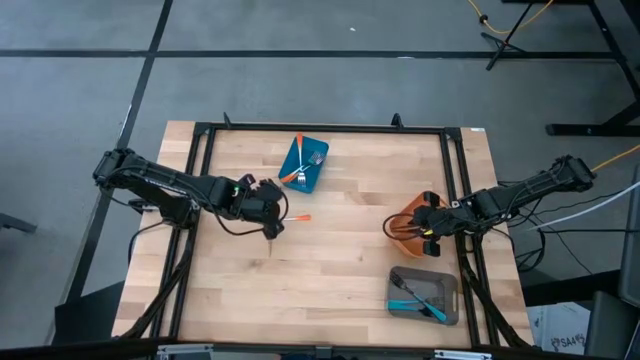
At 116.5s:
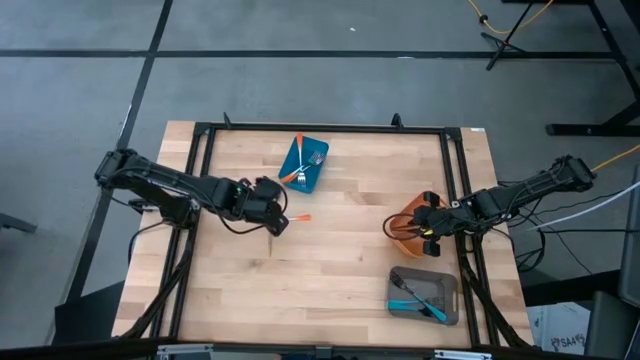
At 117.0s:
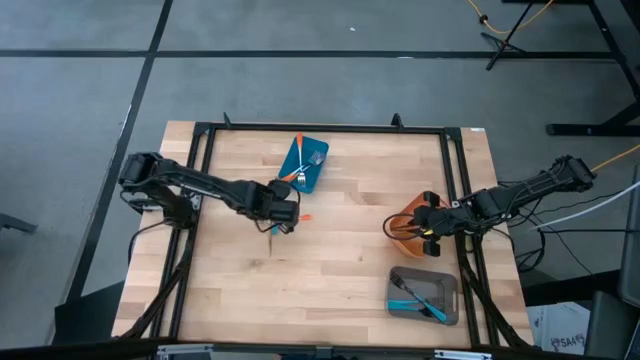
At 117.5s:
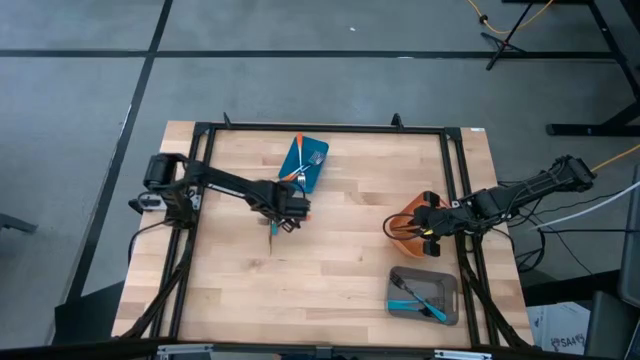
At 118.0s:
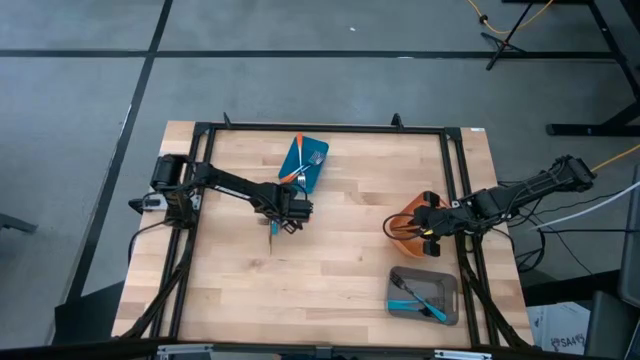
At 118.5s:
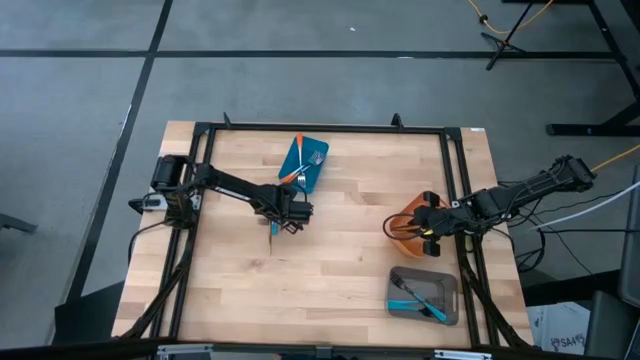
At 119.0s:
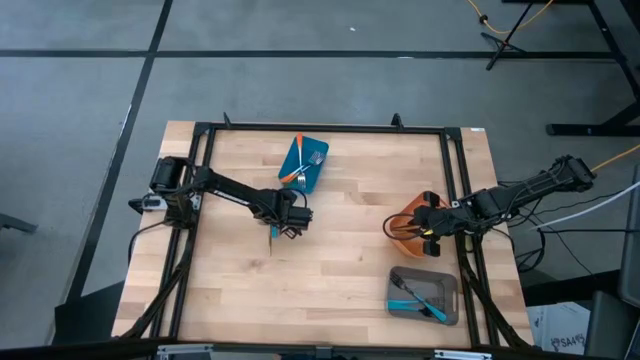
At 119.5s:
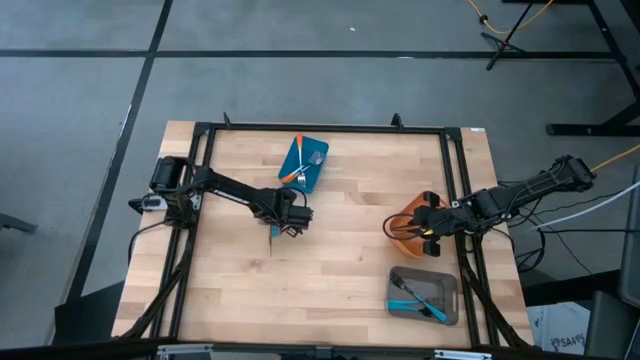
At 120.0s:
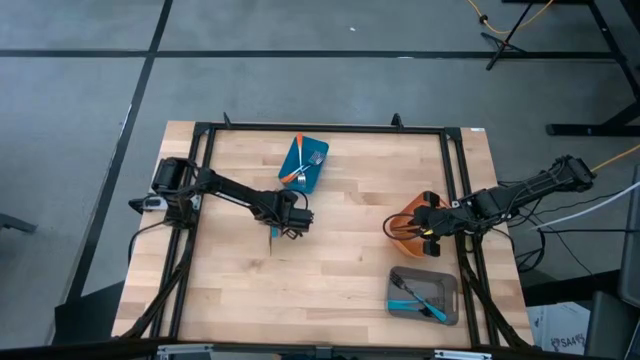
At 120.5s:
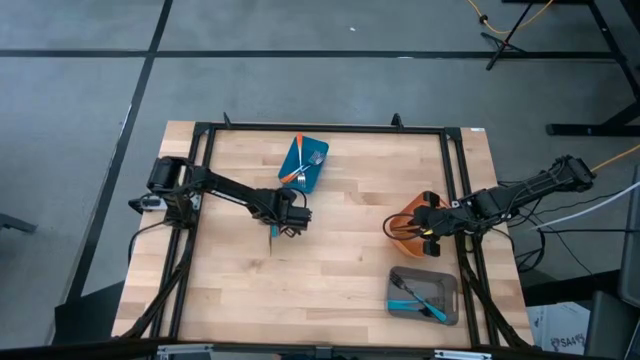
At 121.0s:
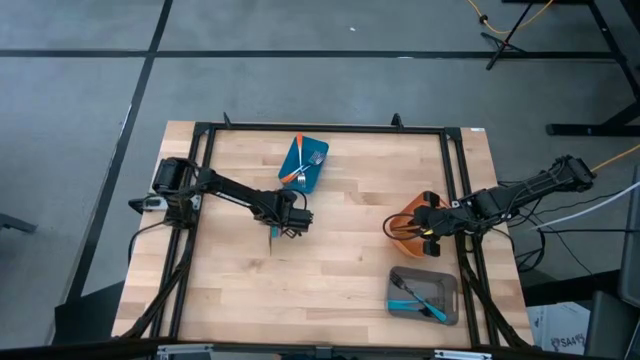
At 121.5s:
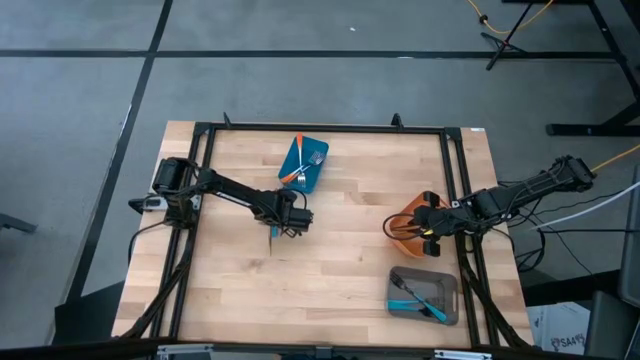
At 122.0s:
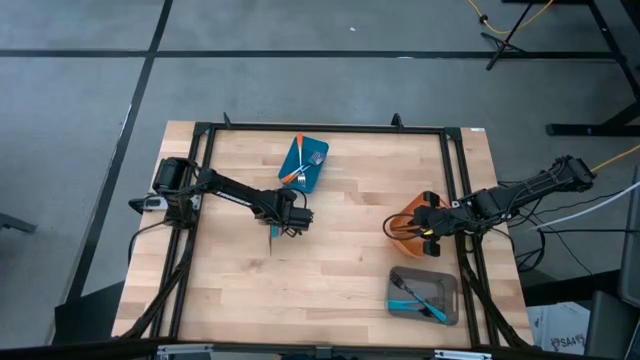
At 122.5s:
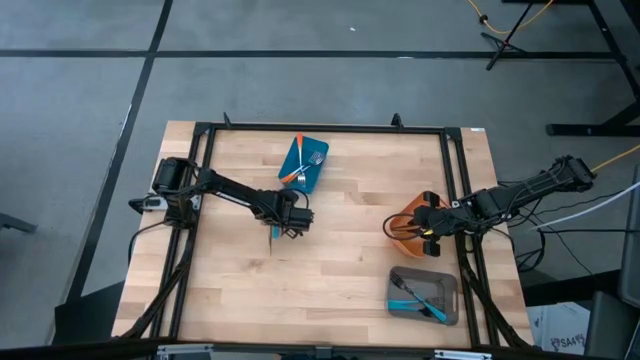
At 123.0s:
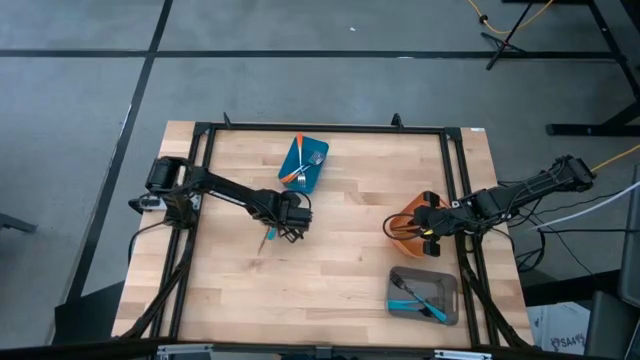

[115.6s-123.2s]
Task: Sort silverware by color (type)
Put the blue fork into the black bin

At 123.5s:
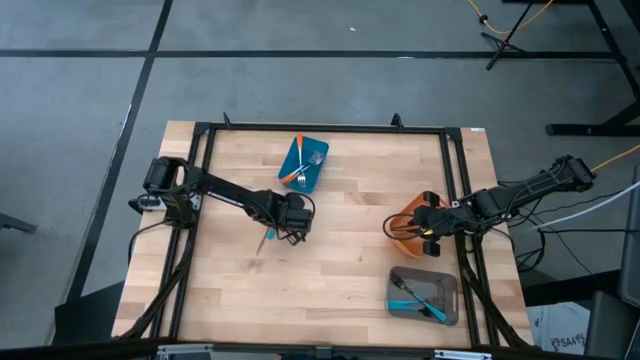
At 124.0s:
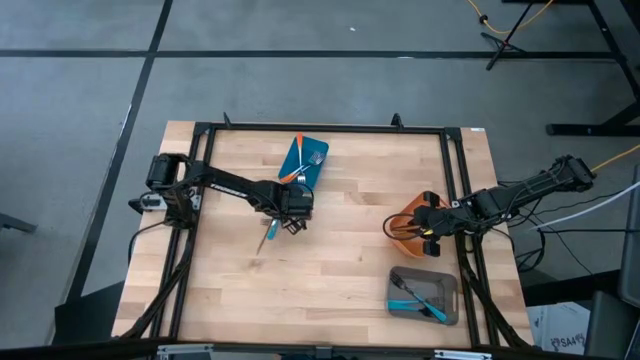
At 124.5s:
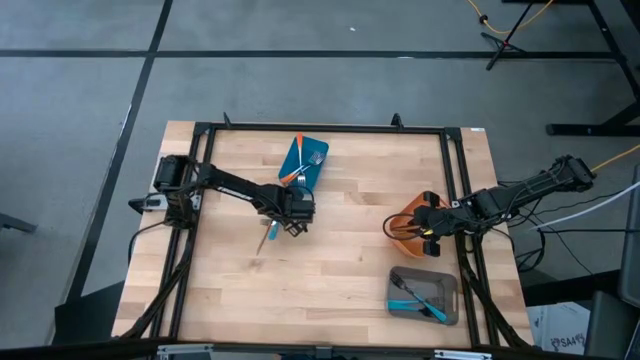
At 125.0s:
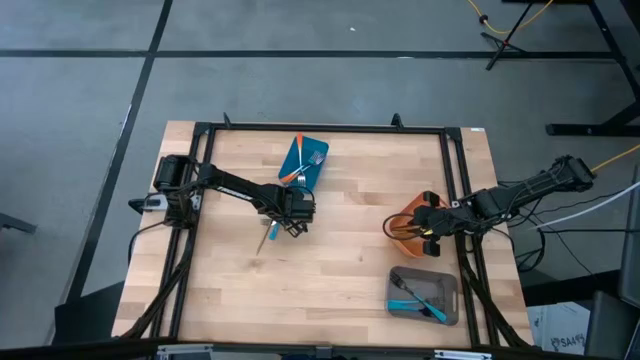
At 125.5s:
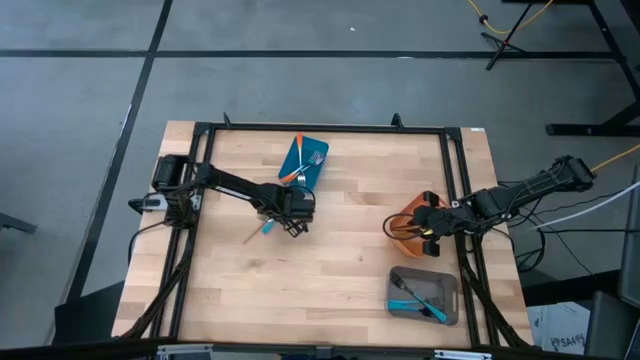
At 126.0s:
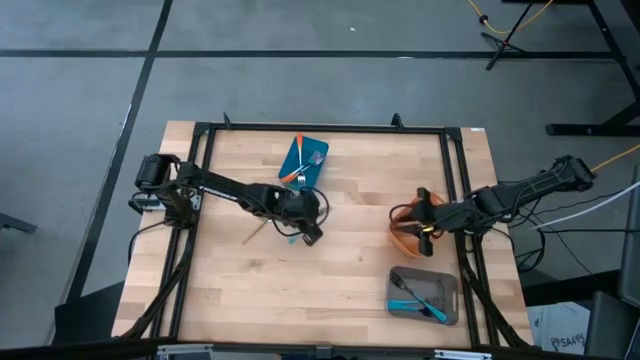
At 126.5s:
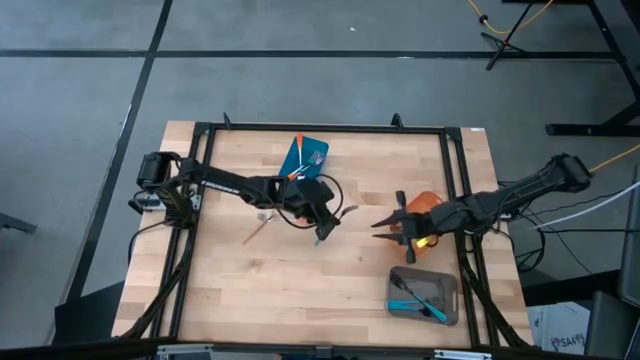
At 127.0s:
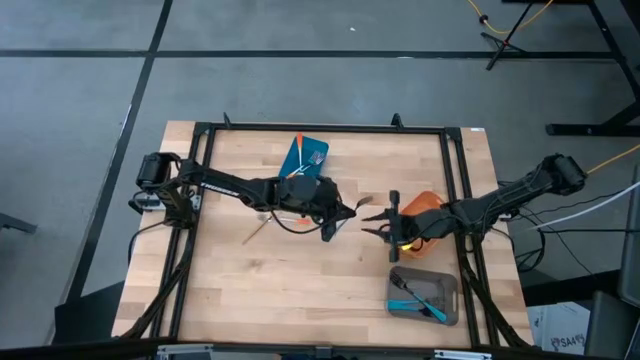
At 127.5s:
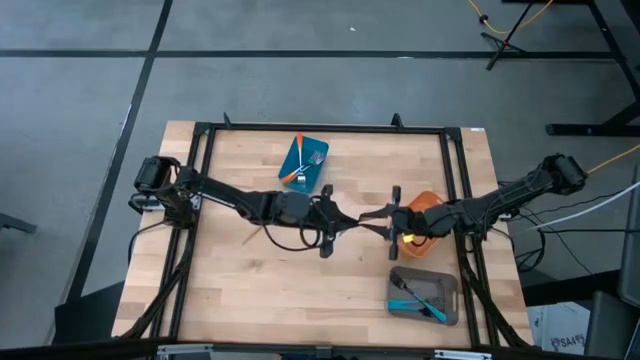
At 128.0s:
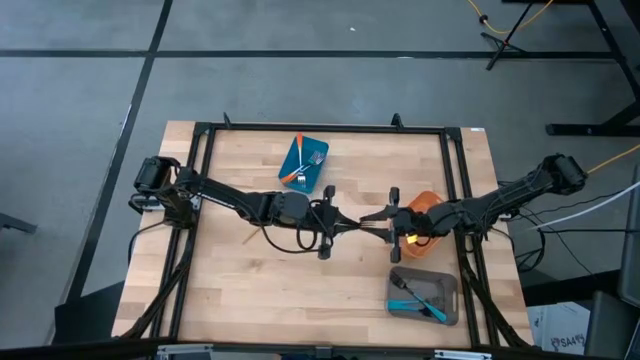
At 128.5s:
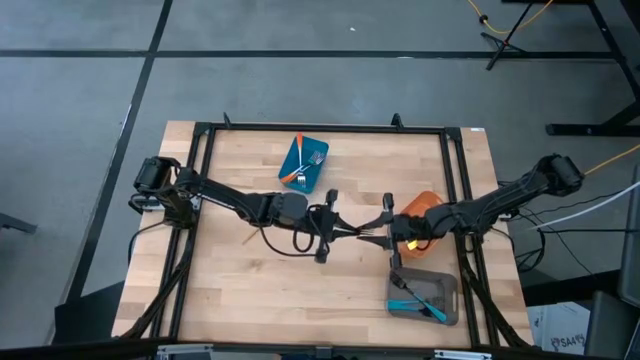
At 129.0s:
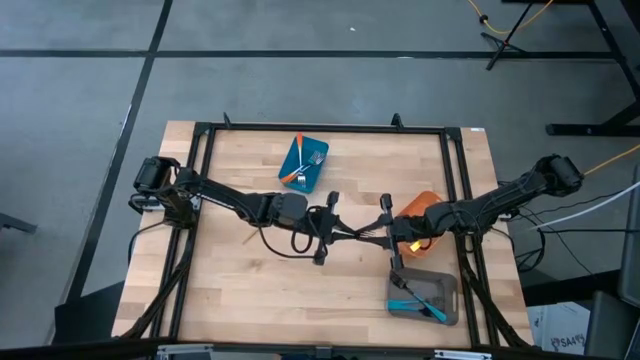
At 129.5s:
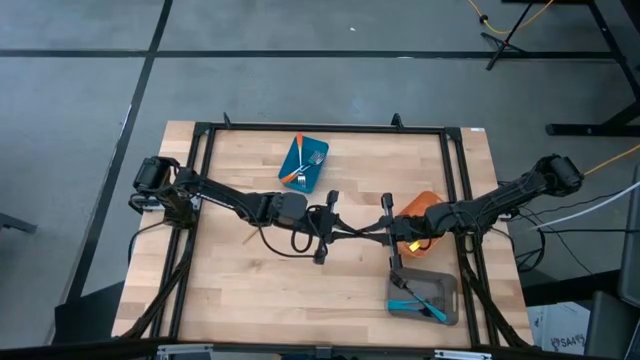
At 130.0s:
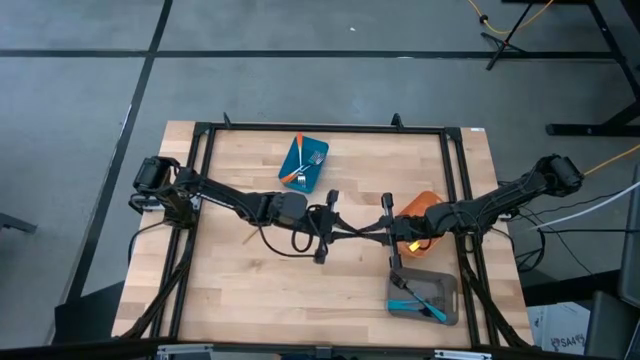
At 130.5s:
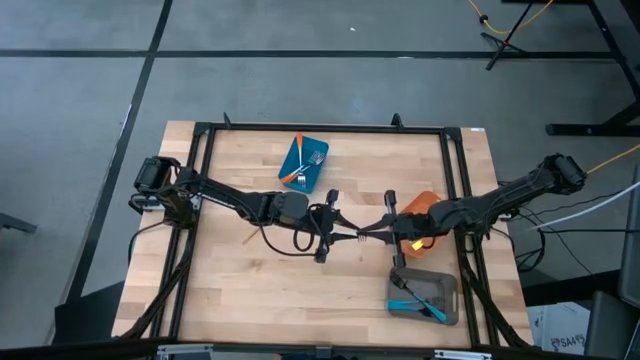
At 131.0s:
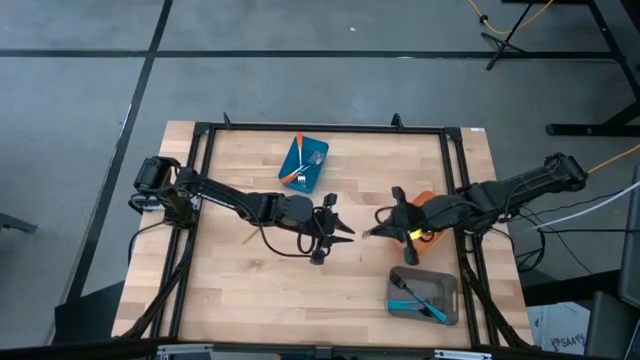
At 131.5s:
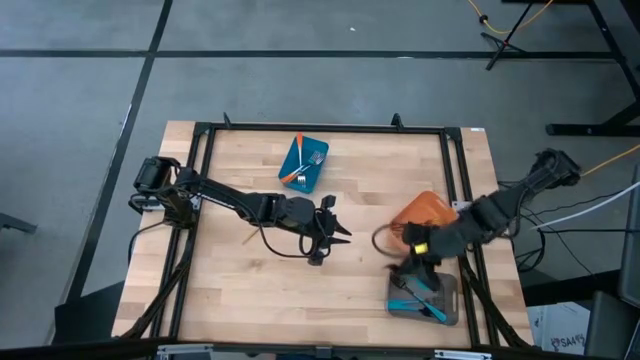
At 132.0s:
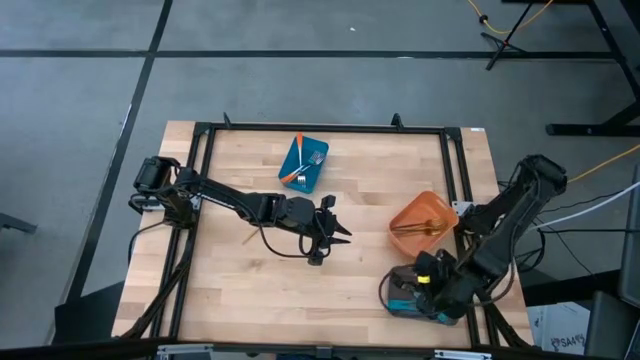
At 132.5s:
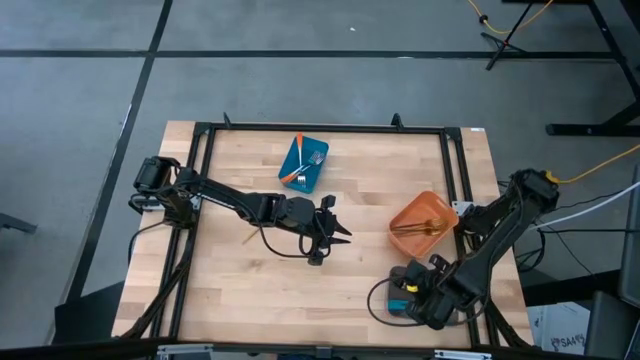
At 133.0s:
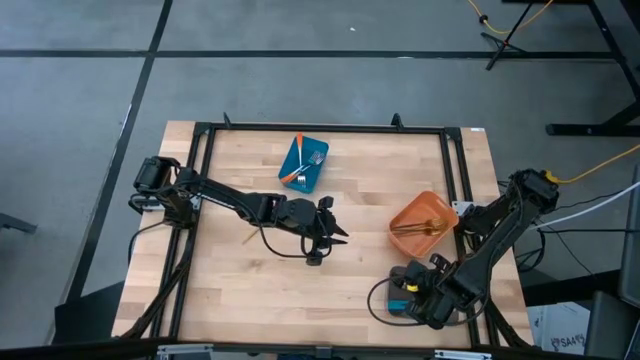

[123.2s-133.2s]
Put the blue fork into the black bin

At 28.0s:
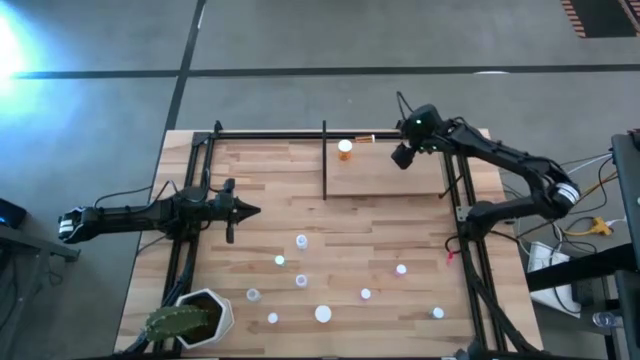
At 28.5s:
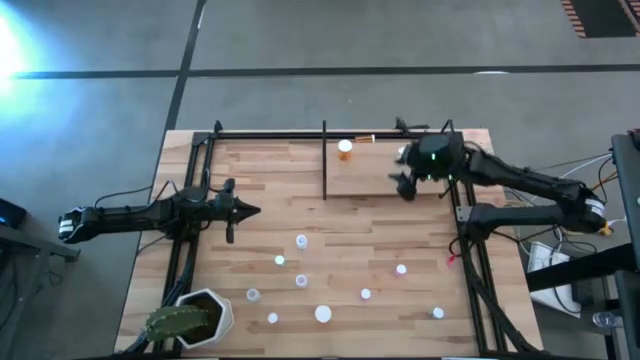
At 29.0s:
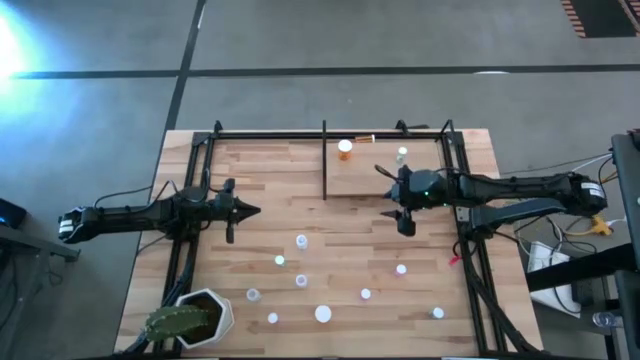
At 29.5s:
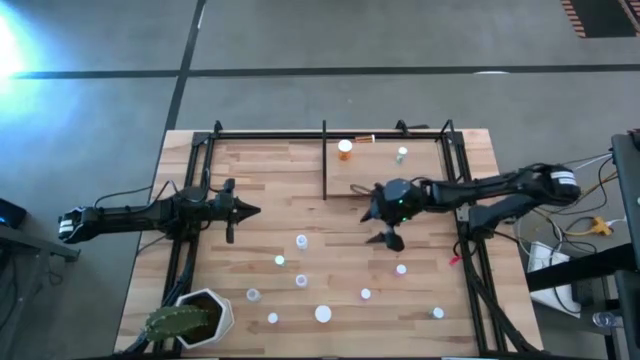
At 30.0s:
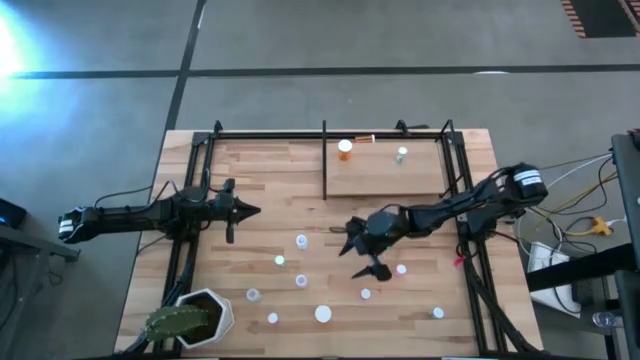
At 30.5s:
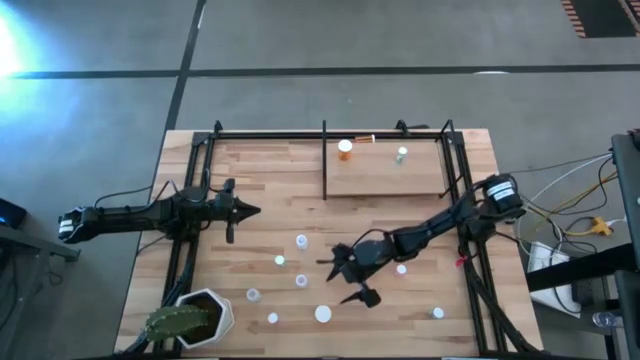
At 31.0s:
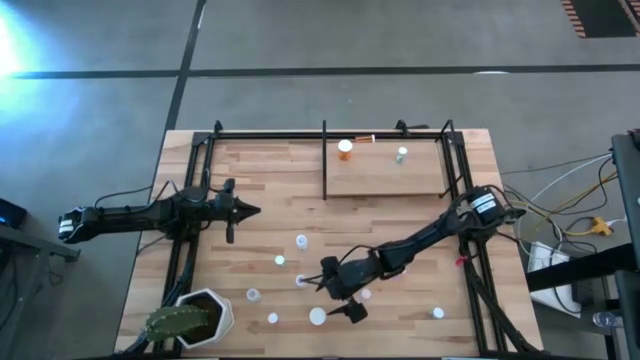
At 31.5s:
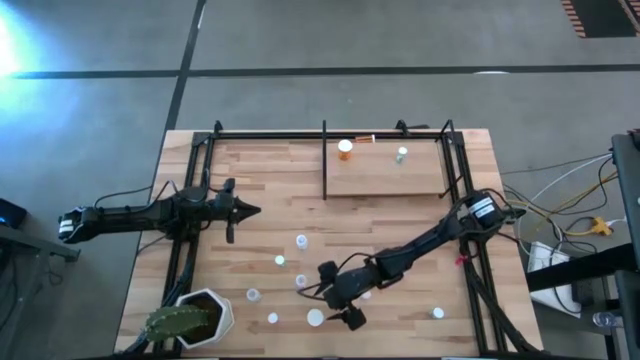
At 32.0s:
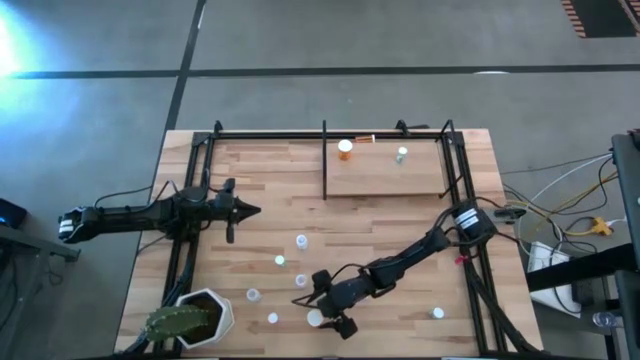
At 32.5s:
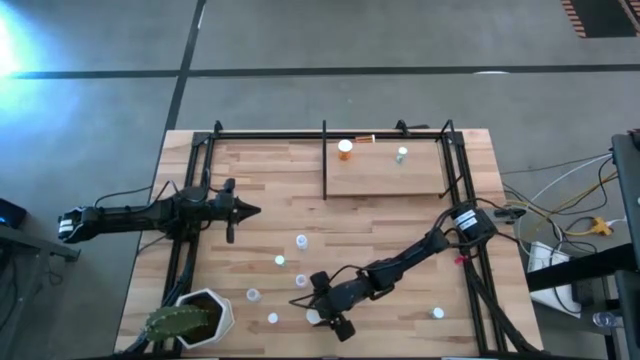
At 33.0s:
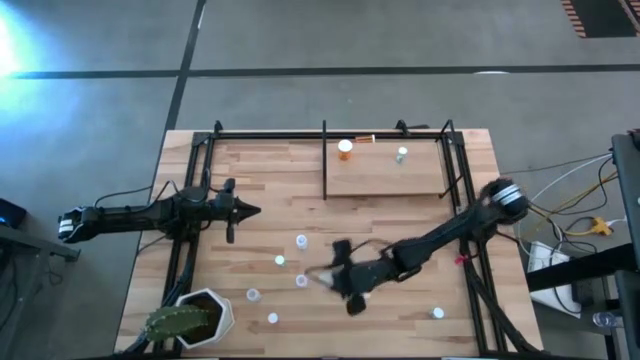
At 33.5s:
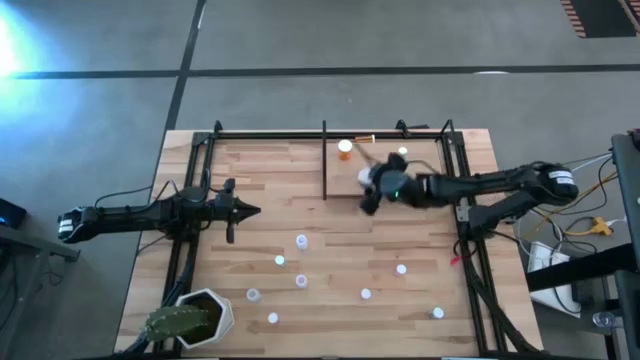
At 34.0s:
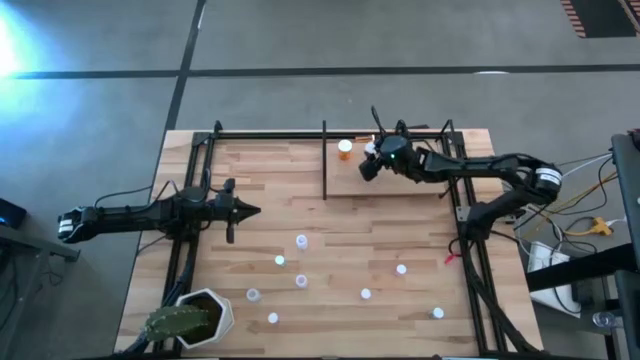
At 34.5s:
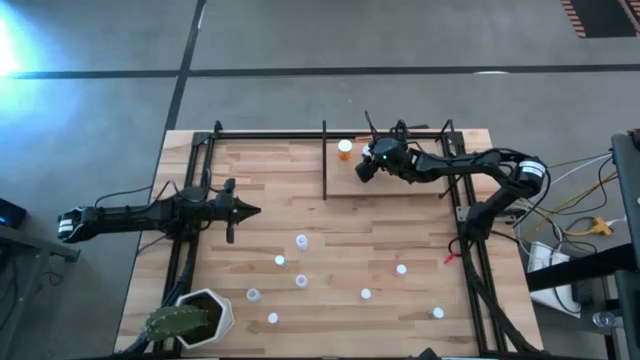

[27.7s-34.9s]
Task: Pick and place medicine bottles onto shelf by color
Put the bottom orange pill bottle on the shelf
